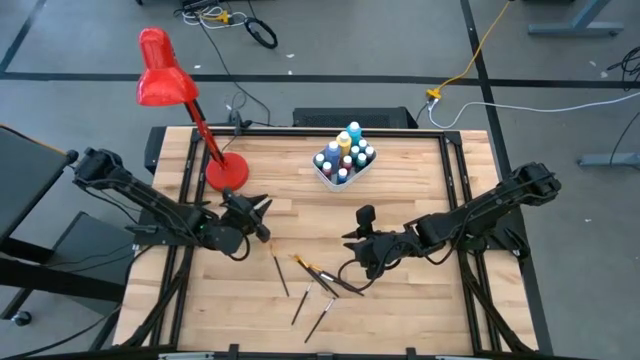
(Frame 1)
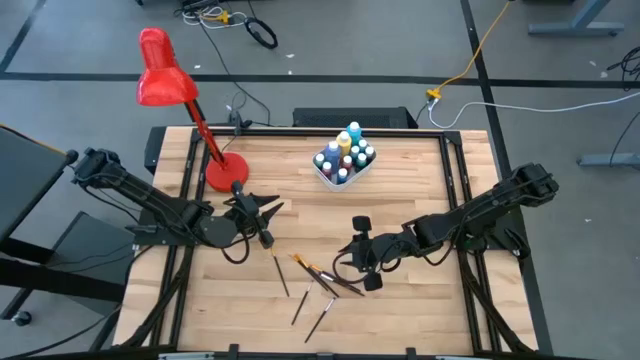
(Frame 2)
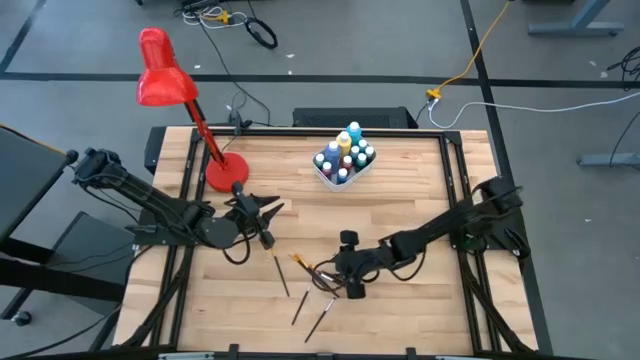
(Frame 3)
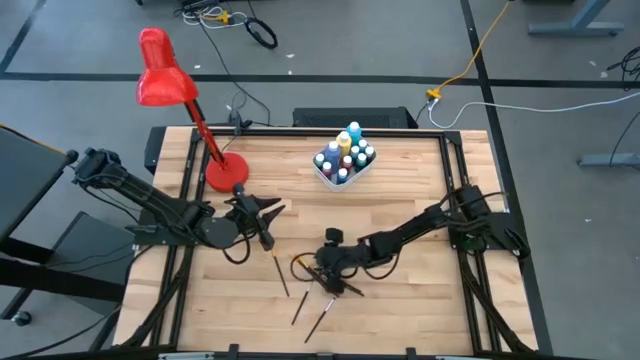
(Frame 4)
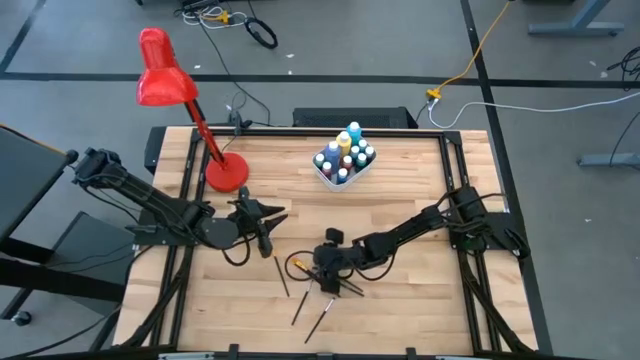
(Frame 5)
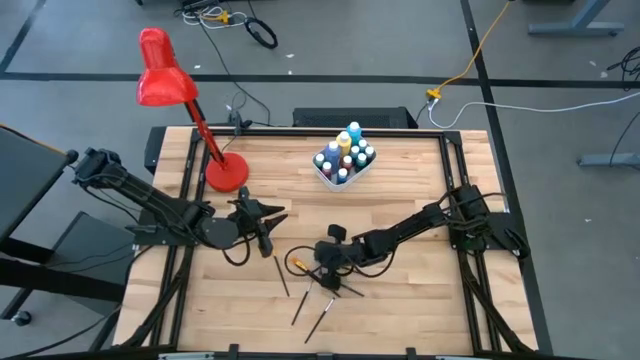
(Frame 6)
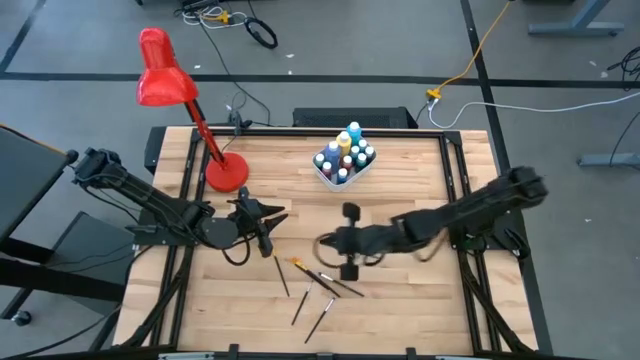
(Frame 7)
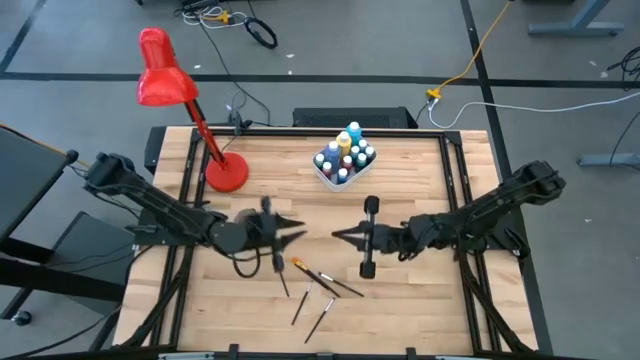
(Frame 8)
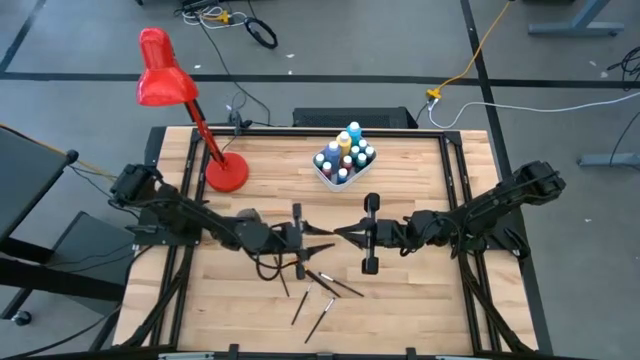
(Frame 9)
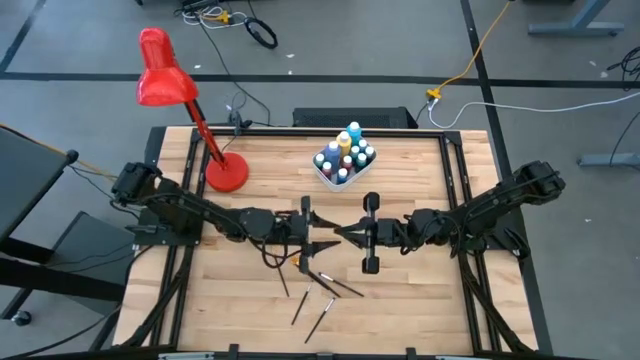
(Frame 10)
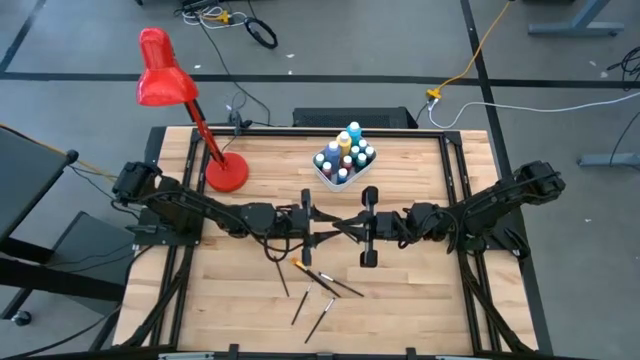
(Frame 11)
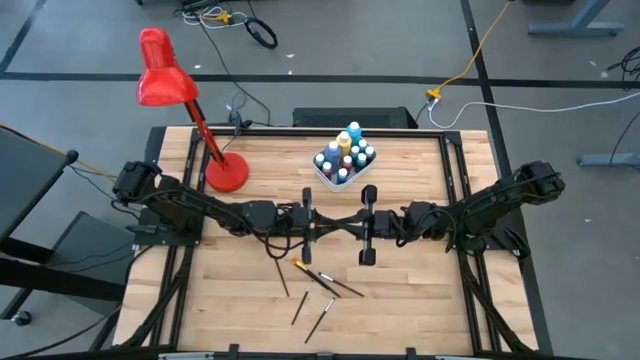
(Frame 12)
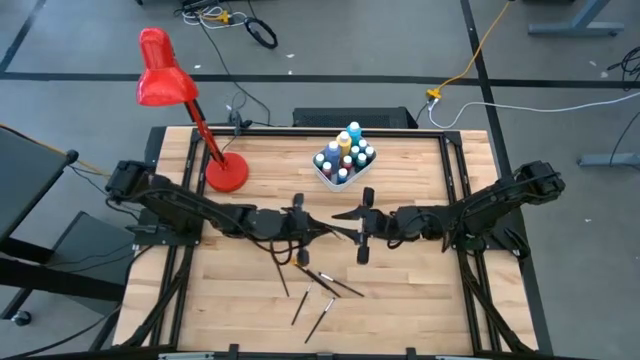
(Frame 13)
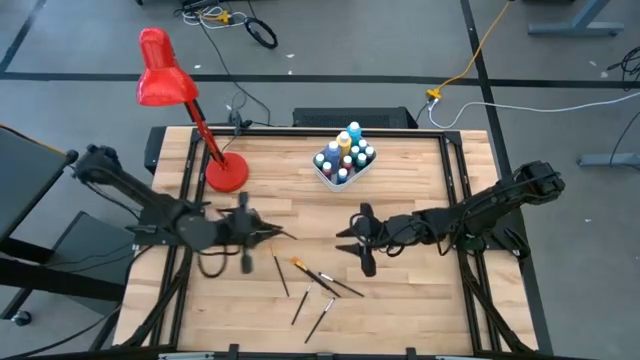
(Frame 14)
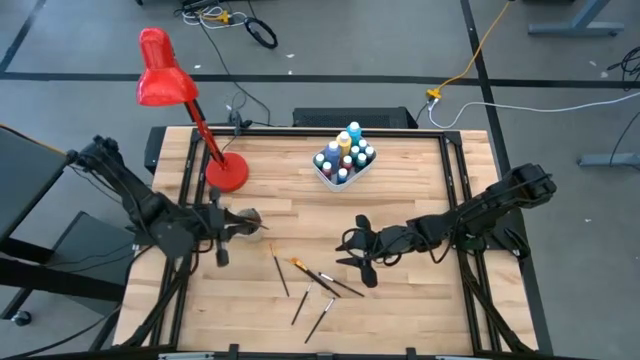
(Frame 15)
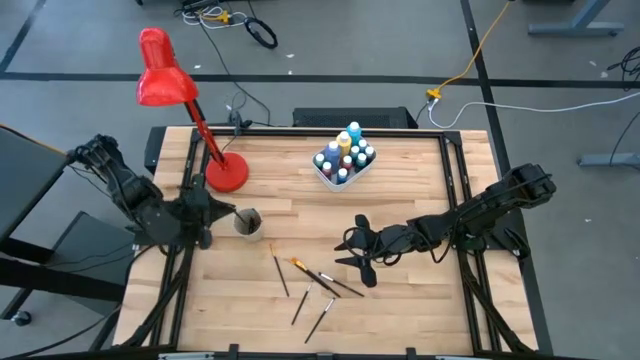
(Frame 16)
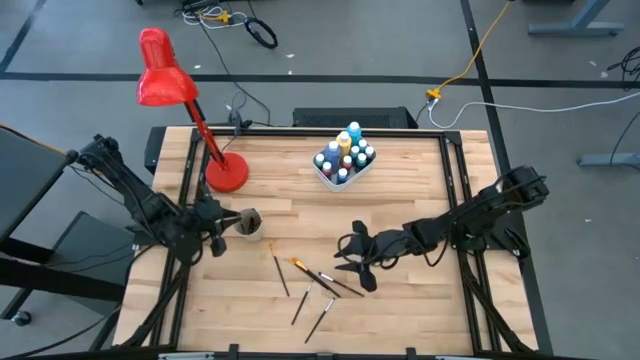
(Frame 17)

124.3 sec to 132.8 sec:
Task: Pick & Place Paint Supplies
Put the gold paint brush into the white cup

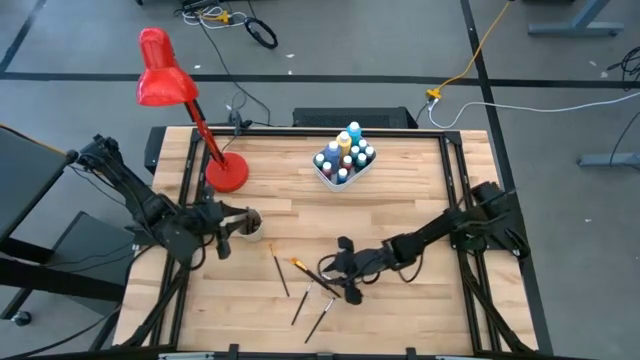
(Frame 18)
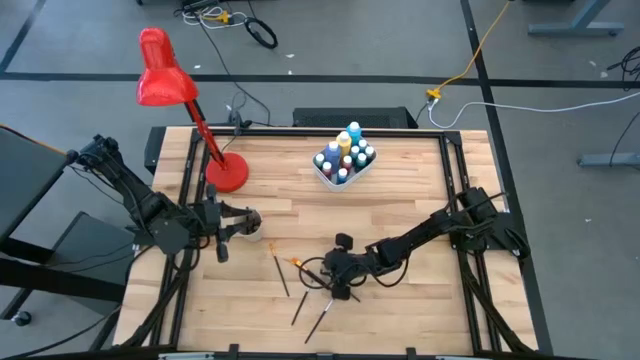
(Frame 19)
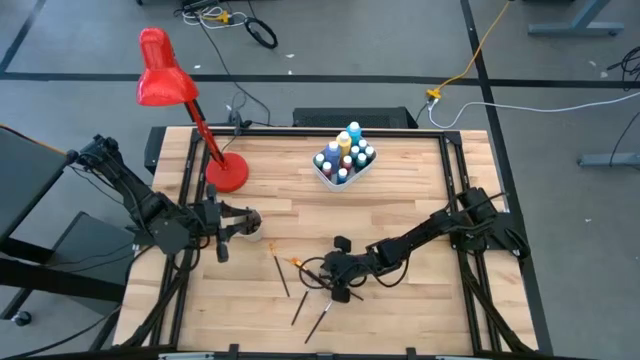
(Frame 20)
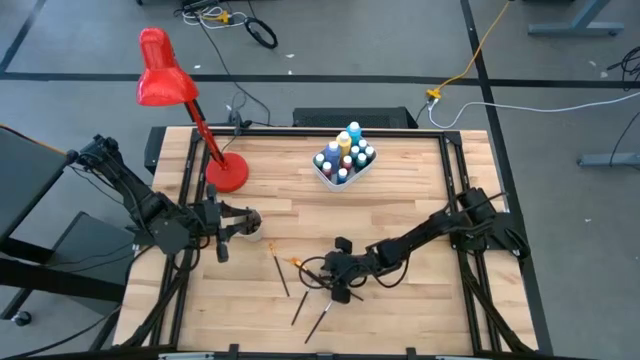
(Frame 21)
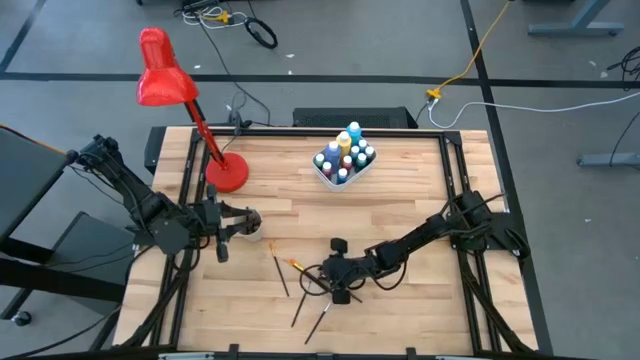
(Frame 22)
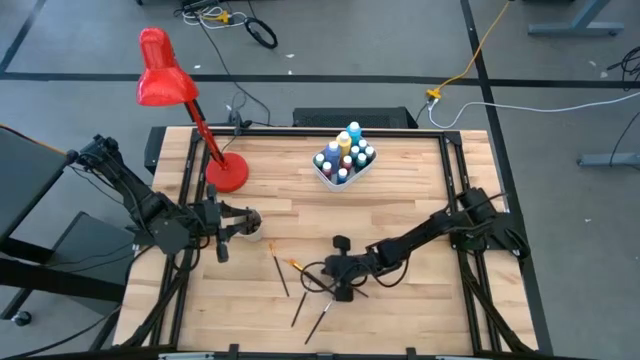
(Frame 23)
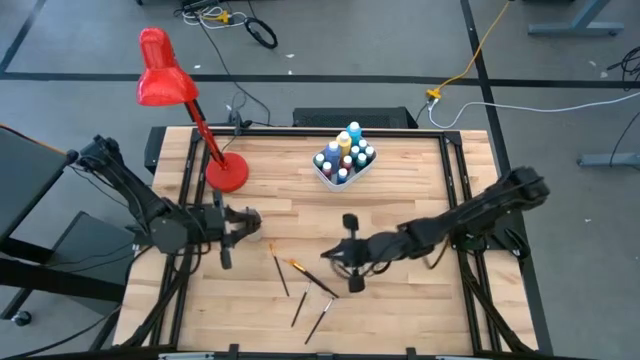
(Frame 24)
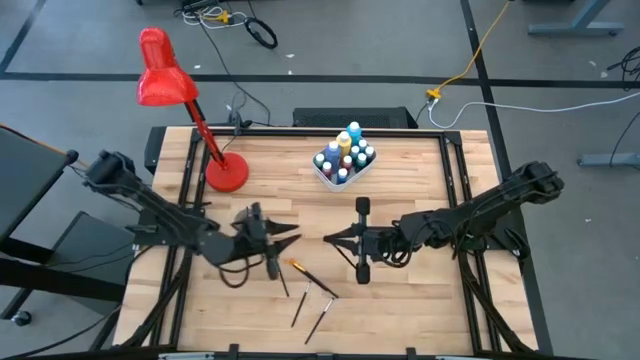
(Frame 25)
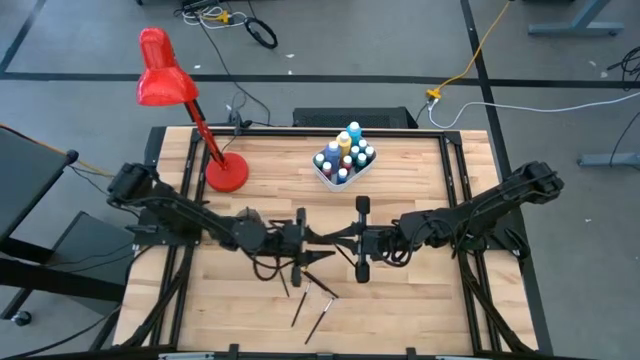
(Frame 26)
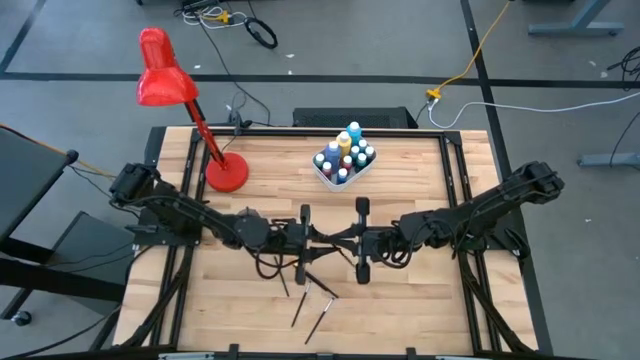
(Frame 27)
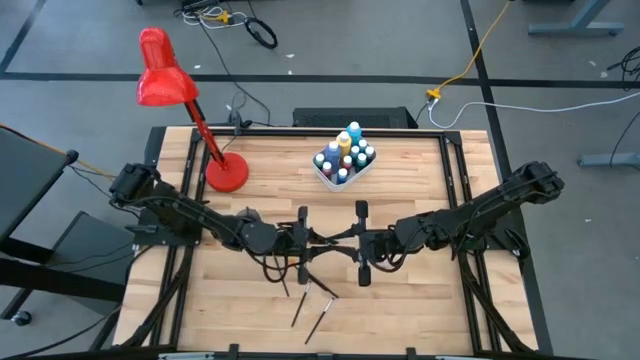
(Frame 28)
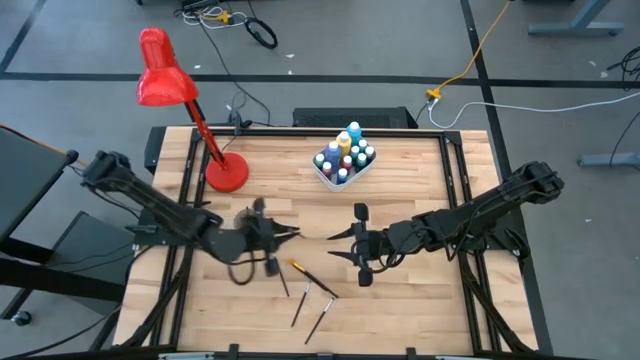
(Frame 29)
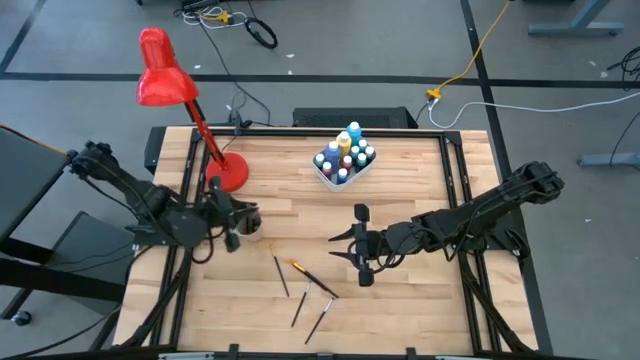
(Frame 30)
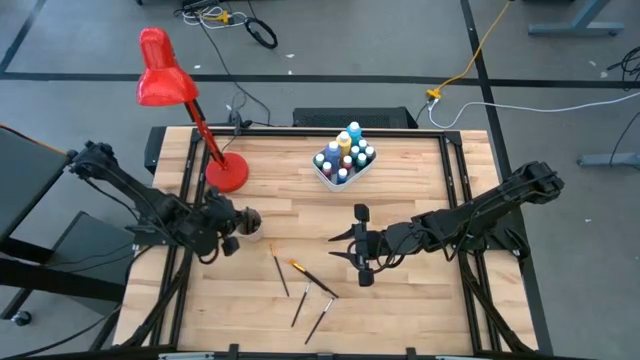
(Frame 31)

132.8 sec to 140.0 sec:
Put the silver paint brush into the white cup

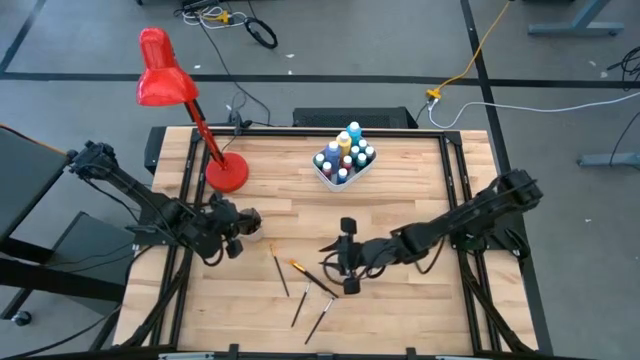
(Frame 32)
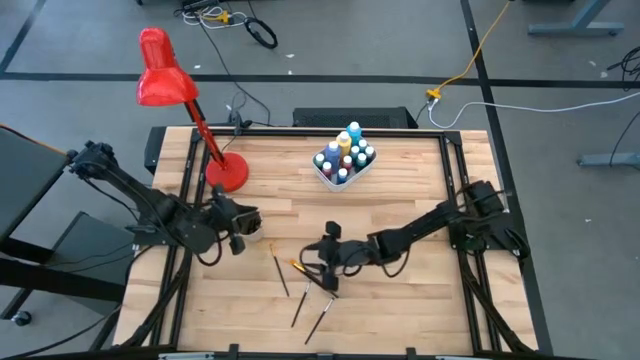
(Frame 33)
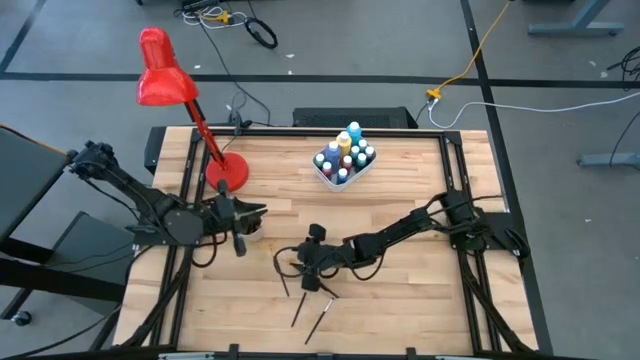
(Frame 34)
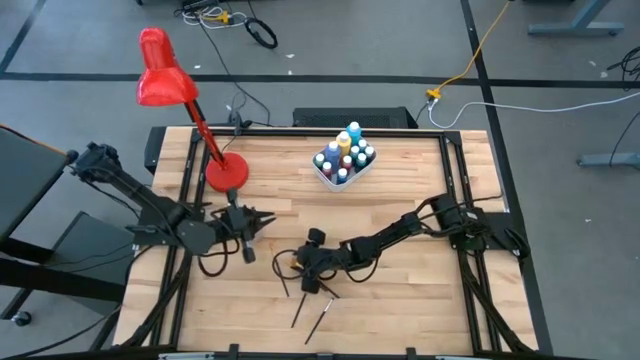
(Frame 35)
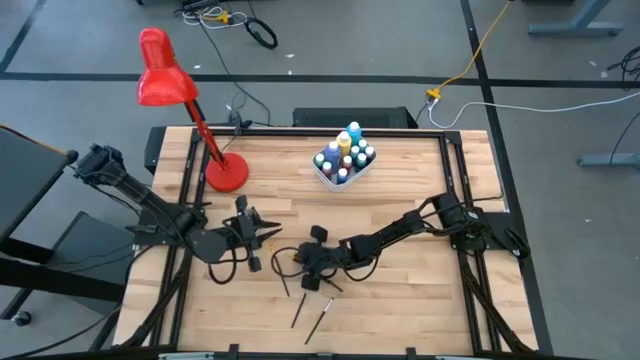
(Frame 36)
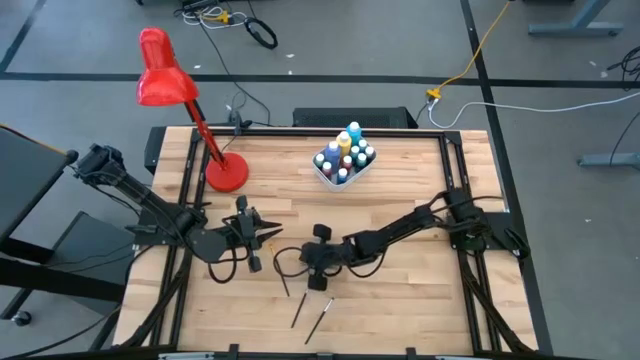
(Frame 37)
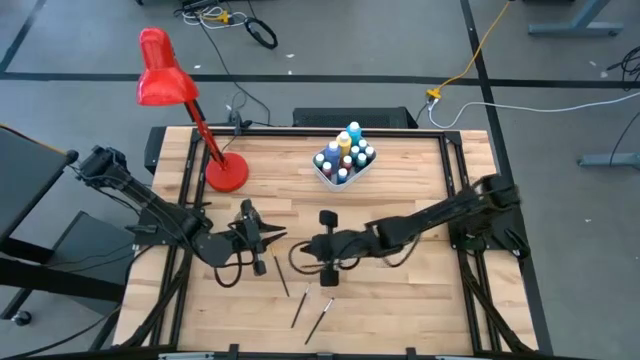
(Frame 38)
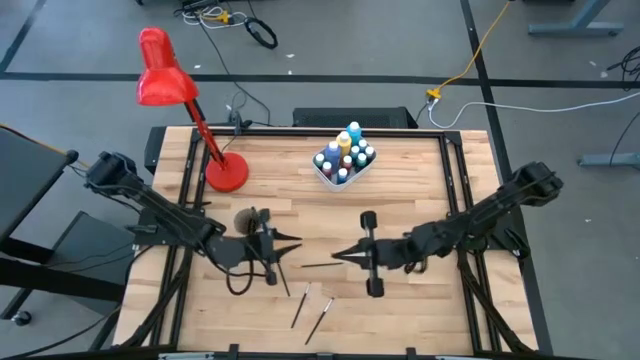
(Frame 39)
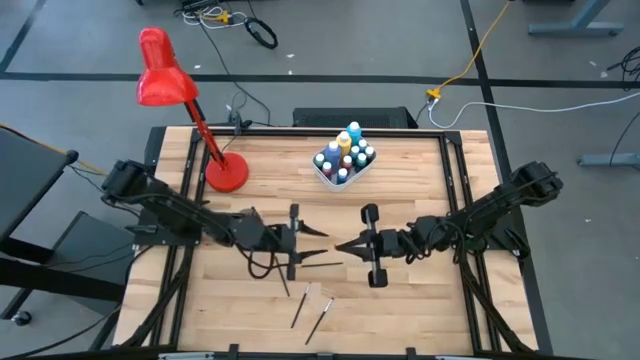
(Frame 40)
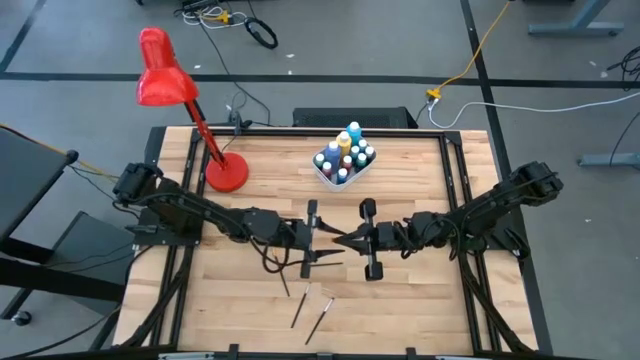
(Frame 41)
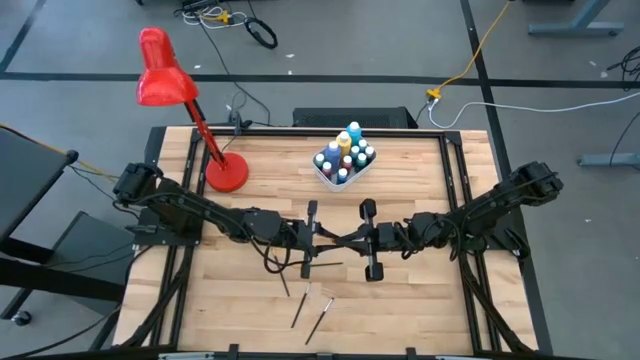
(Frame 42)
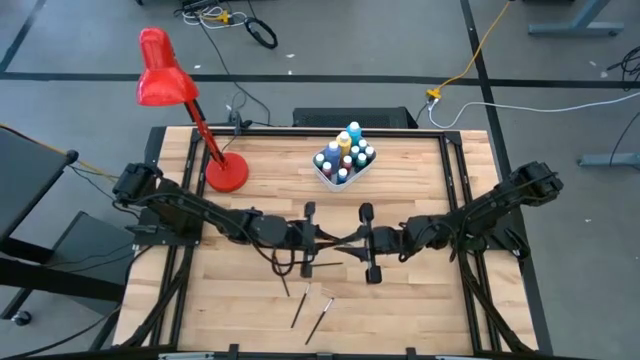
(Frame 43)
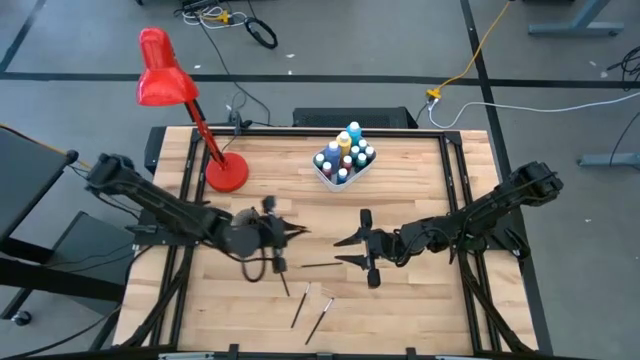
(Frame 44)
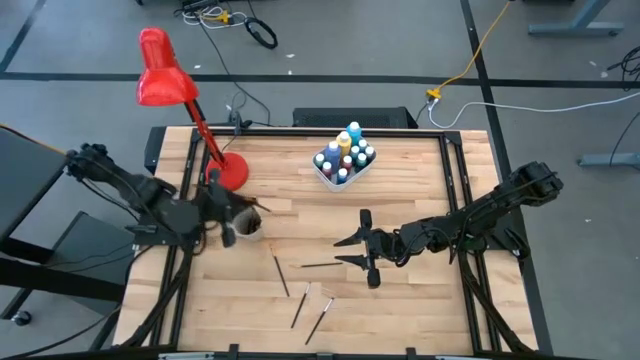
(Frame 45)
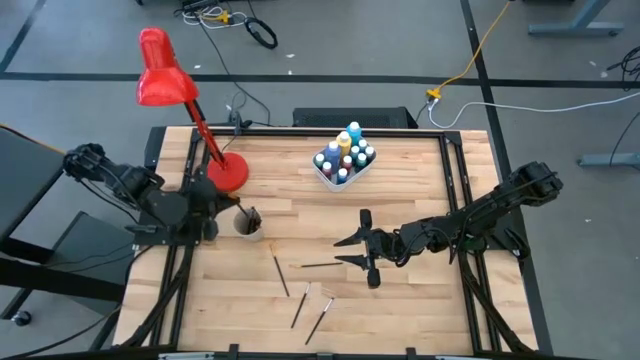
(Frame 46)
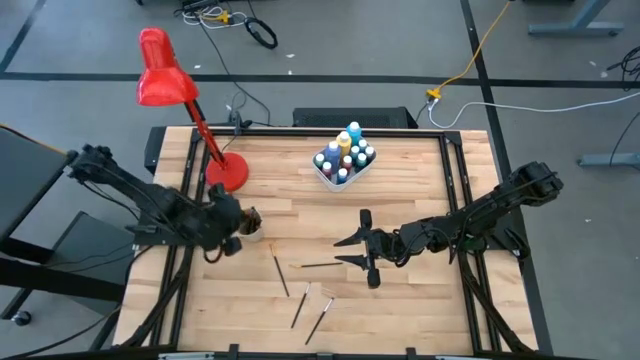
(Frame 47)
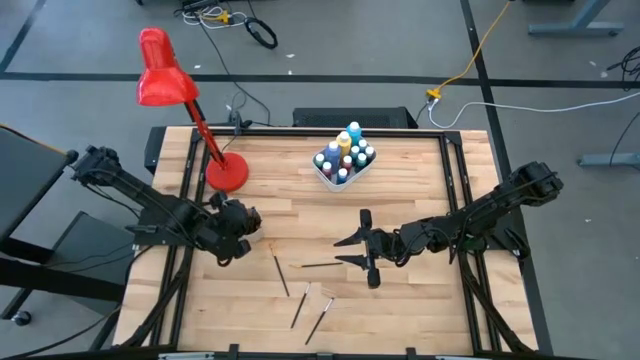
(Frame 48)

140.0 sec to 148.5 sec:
Put the gold paint brush into the white cup
